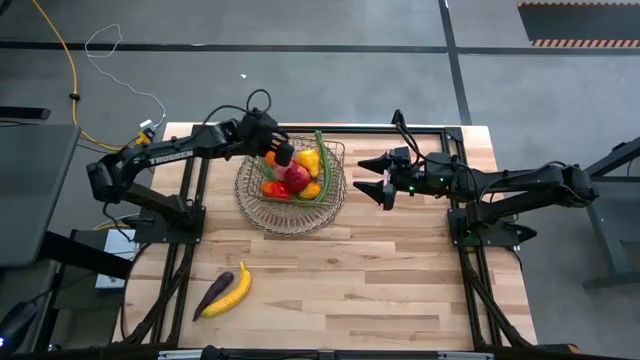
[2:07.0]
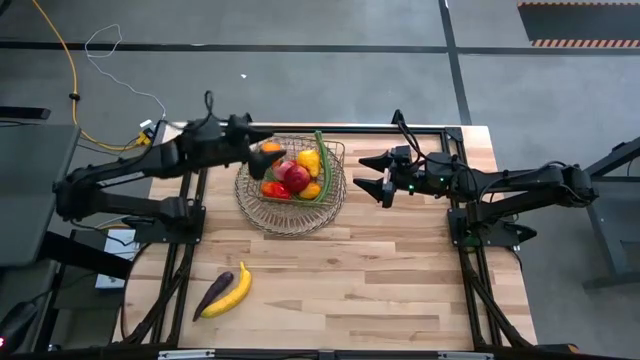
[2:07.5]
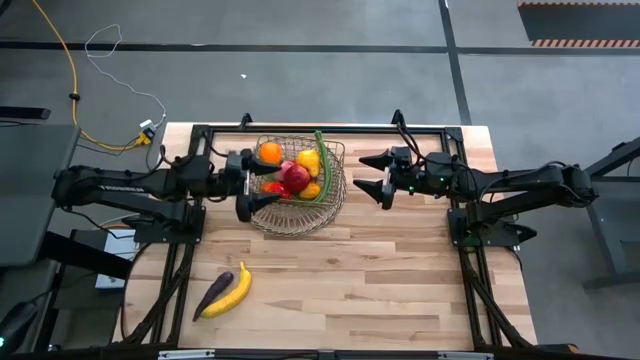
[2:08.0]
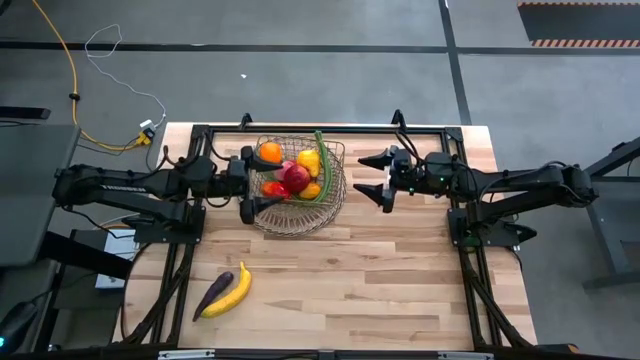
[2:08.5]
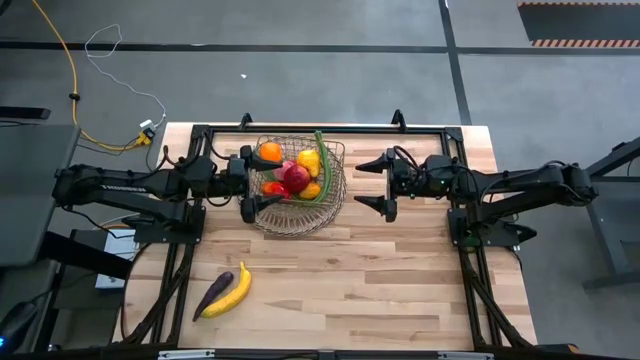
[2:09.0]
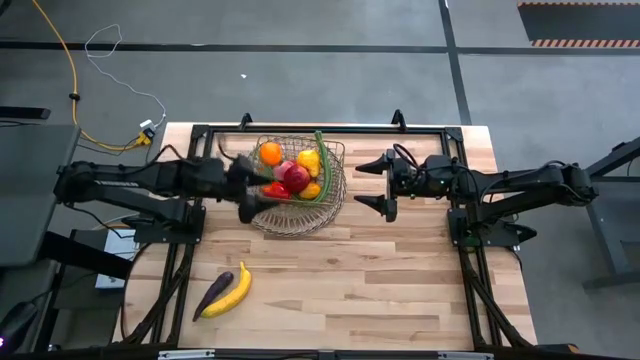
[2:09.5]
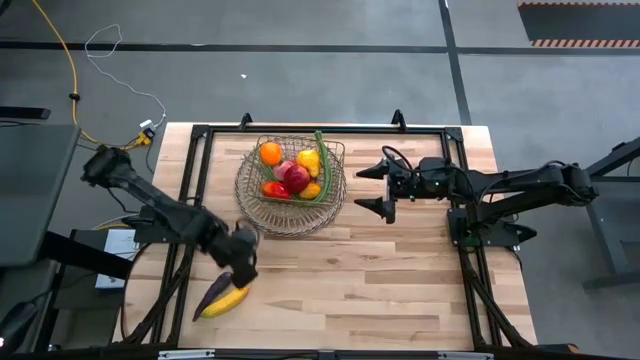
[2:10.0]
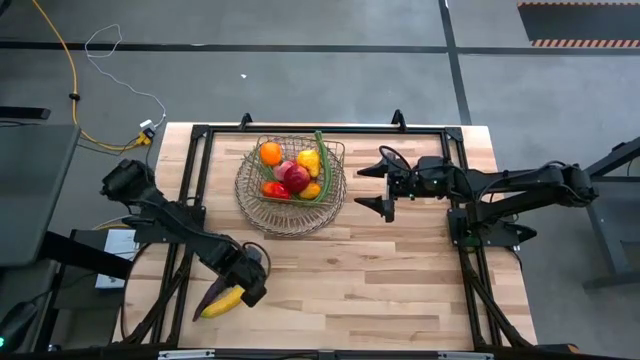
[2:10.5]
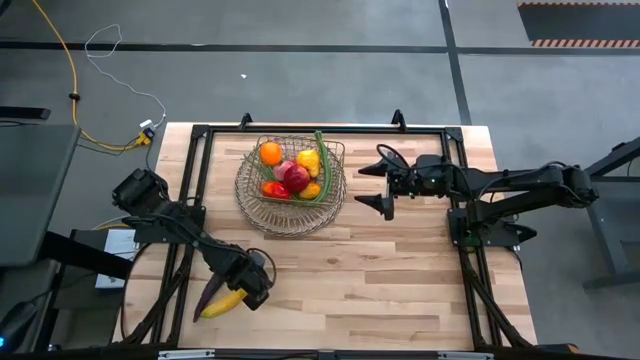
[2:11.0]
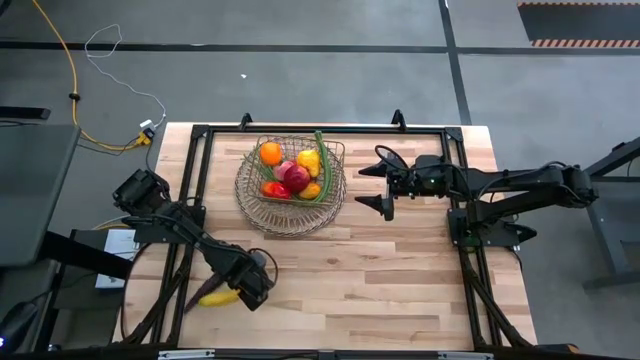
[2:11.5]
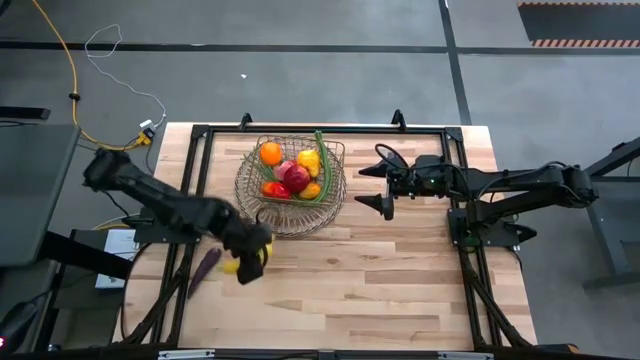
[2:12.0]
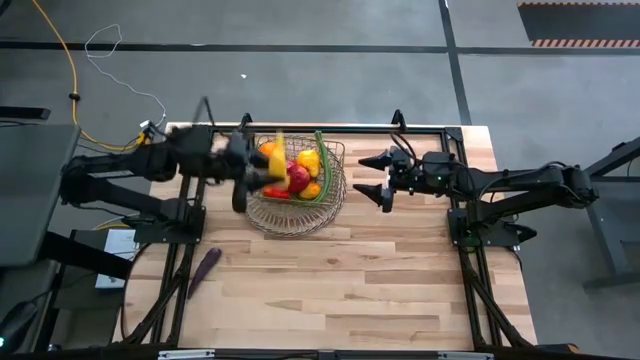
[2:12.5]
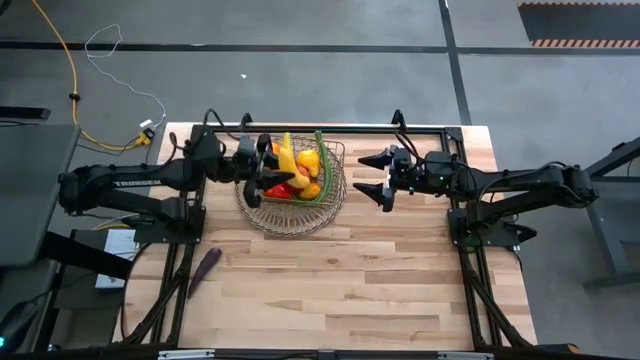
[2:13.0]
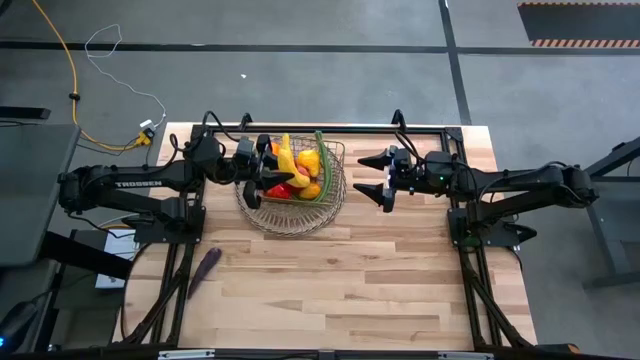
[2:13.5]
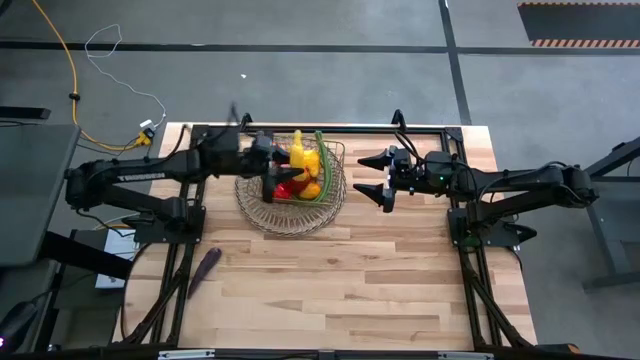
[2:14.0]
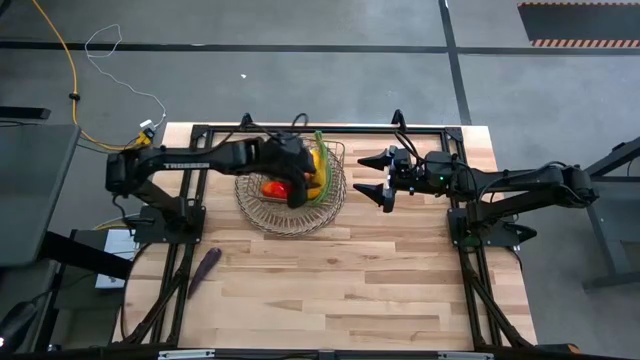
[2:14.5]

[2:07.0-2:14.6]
Task: Build produce basket
Put the yellow banana into the wire basket

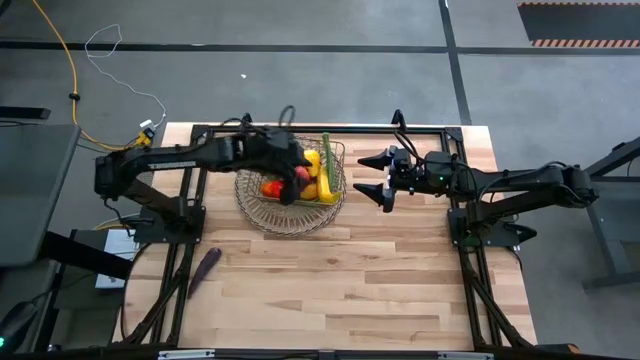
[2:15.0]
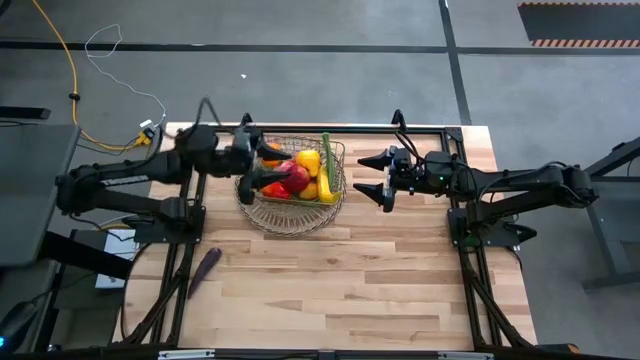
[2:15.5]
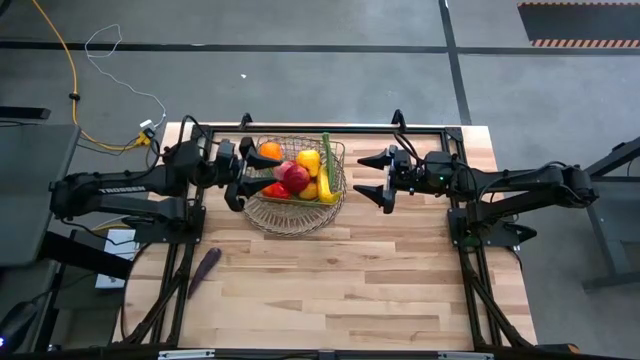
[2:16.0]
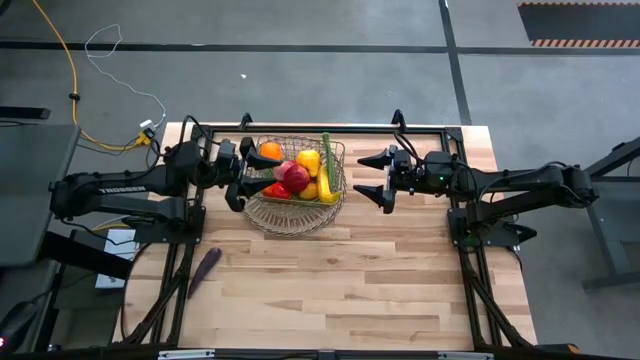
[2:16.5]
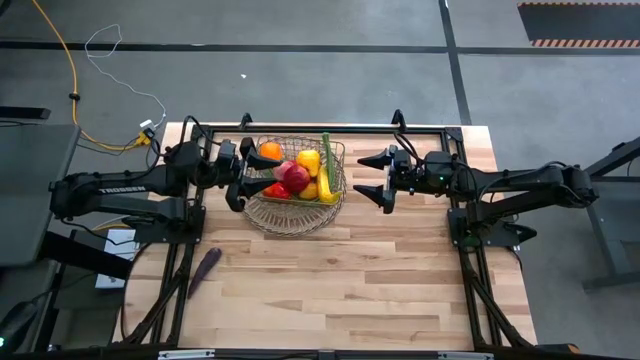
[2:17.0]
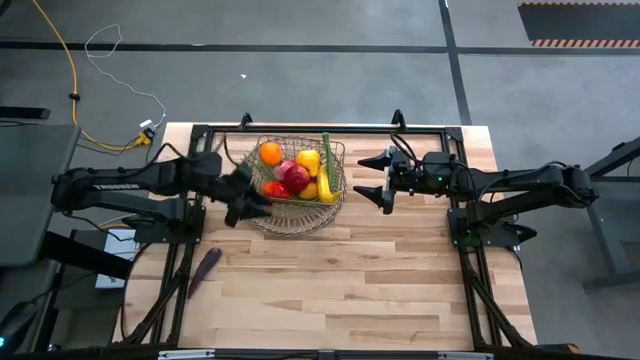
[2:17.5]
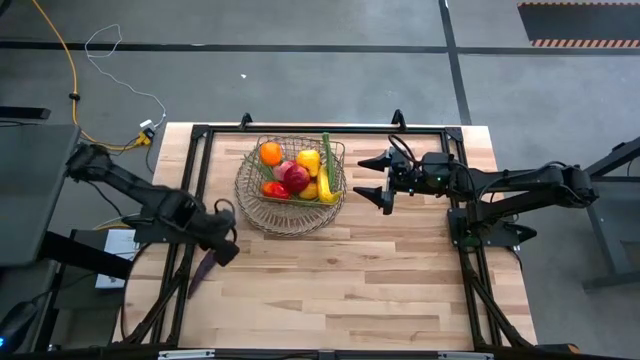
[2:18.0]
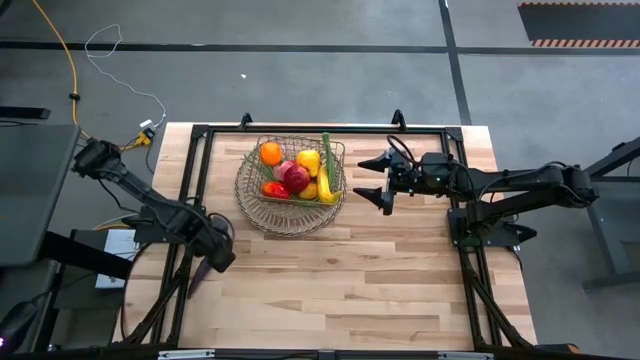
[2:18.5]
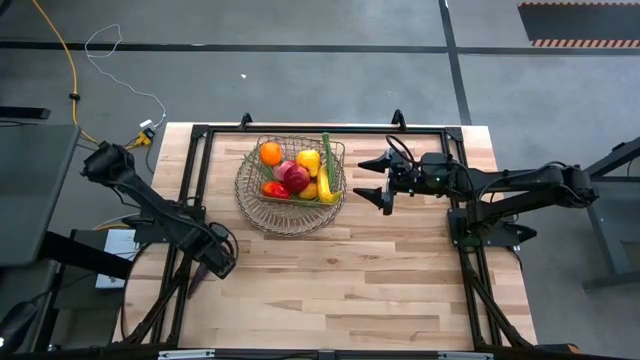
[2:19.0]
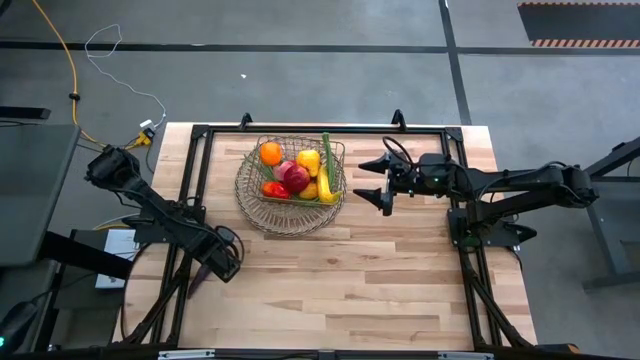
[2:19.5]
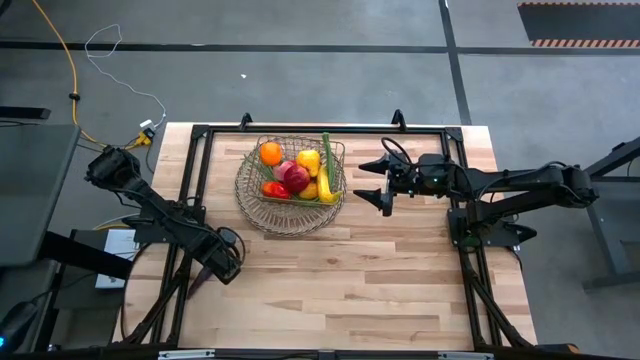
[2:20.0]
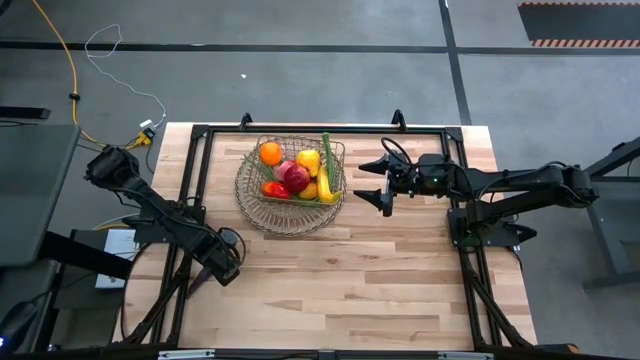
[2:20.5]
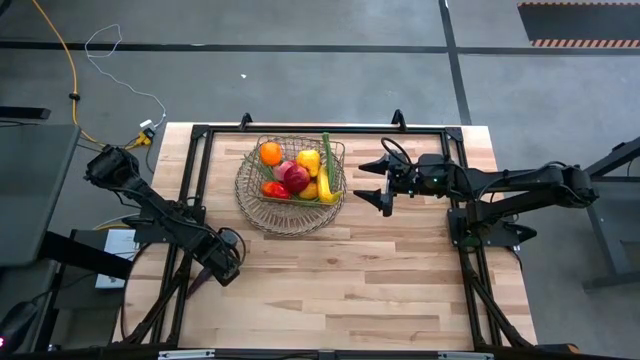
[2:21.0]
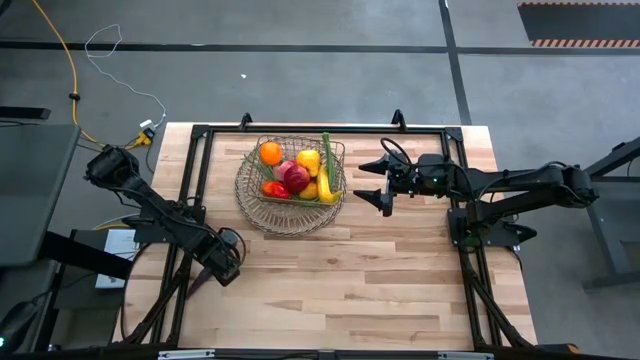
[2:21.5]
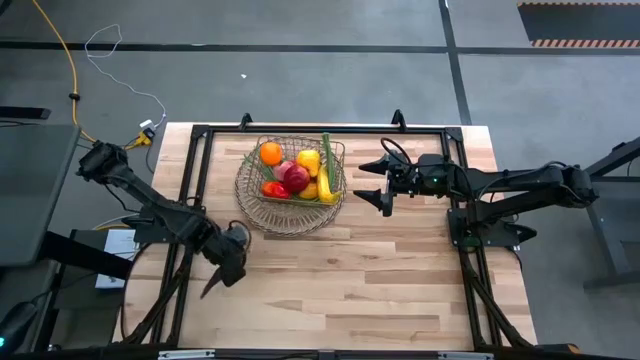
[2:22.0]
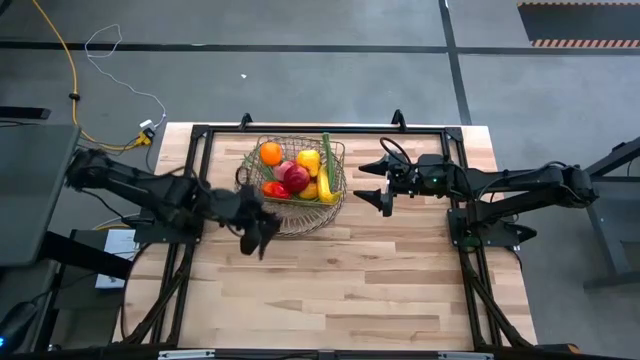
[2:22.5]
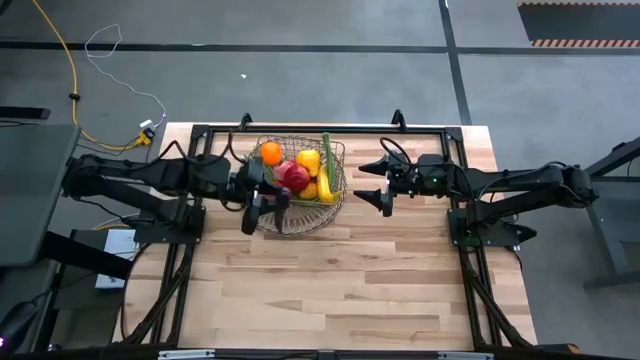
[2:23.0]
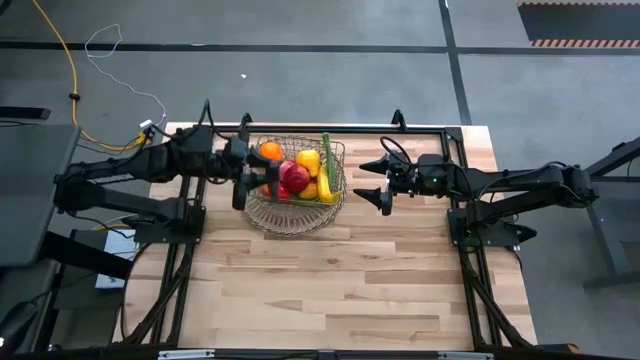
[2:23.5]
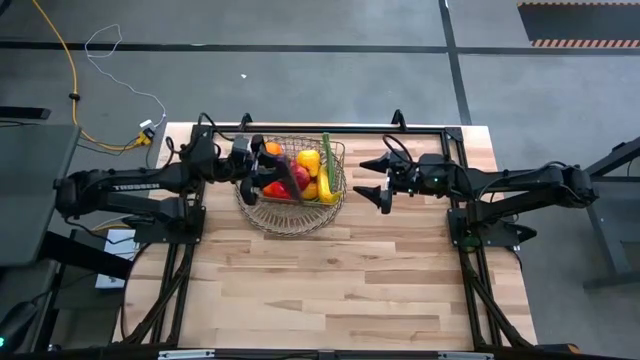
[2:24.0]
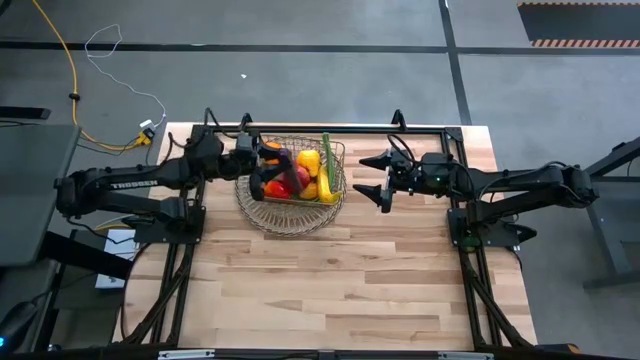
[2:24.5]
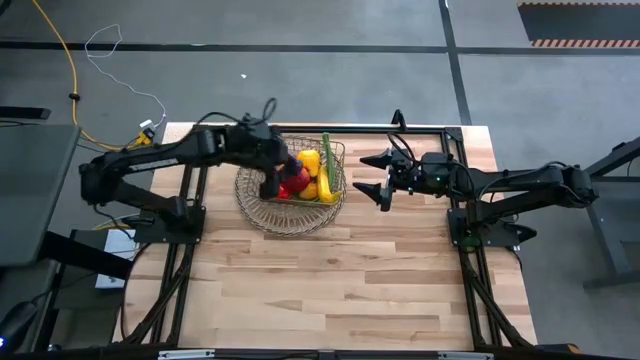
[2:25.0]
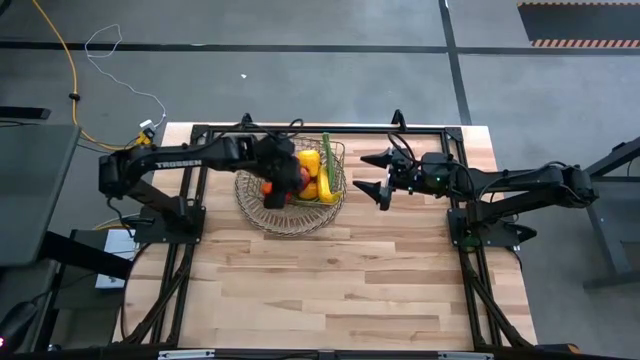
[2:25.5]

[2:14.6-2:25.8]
Put the violet eggplant into the wire basket

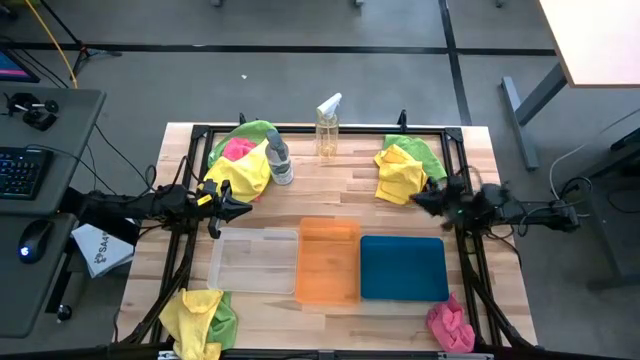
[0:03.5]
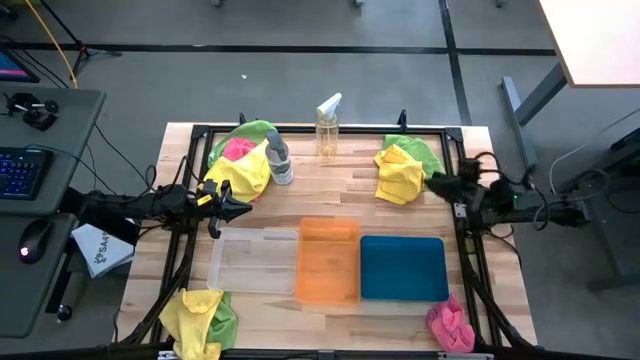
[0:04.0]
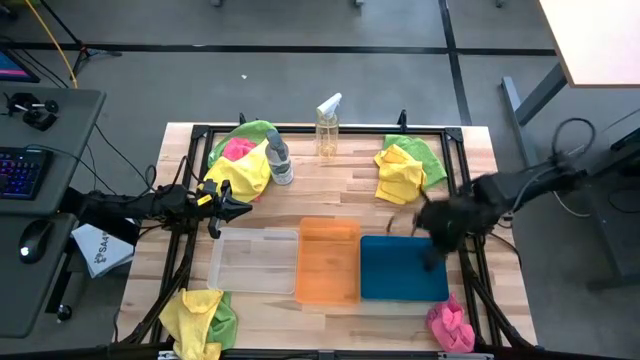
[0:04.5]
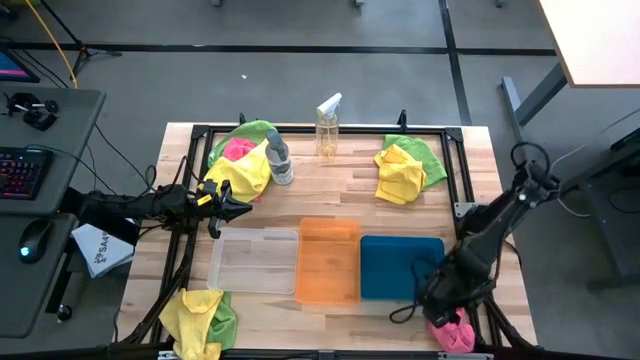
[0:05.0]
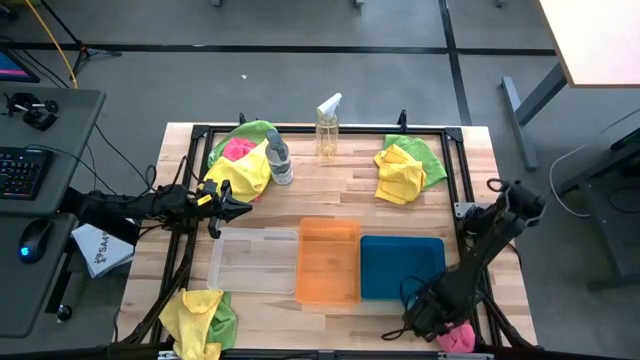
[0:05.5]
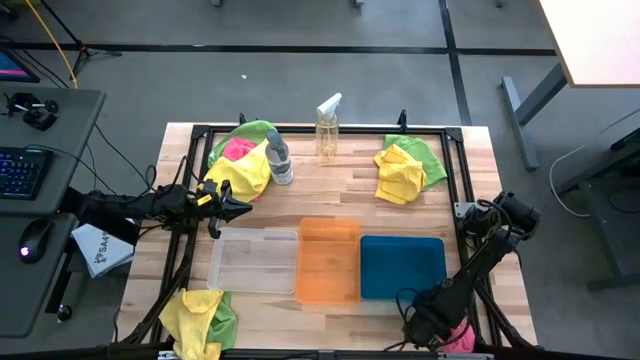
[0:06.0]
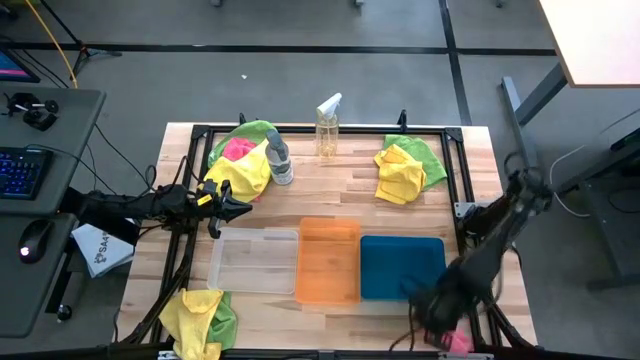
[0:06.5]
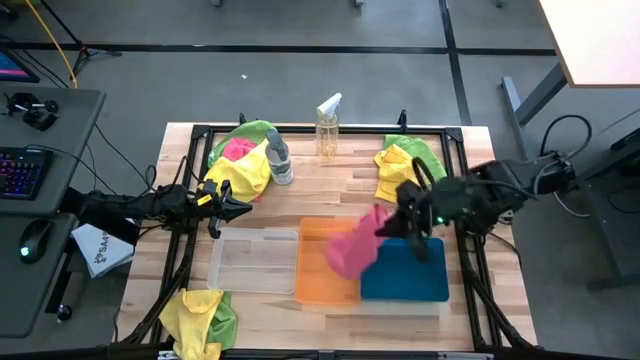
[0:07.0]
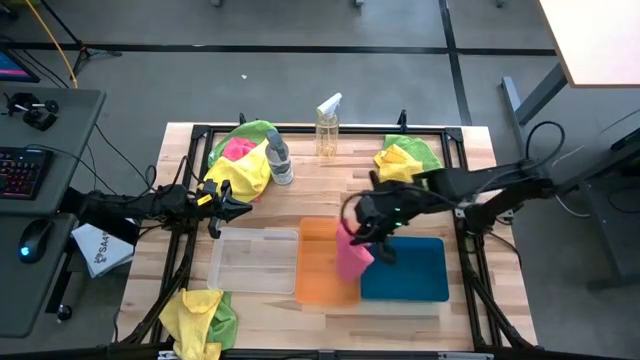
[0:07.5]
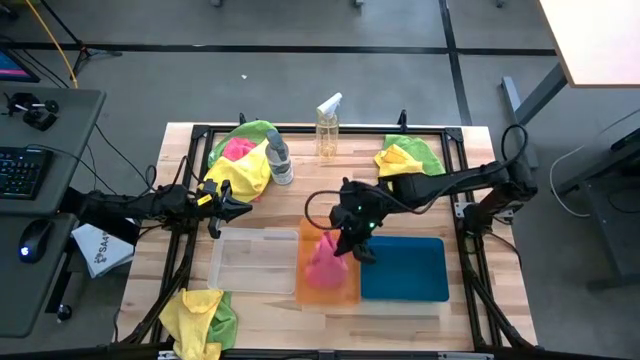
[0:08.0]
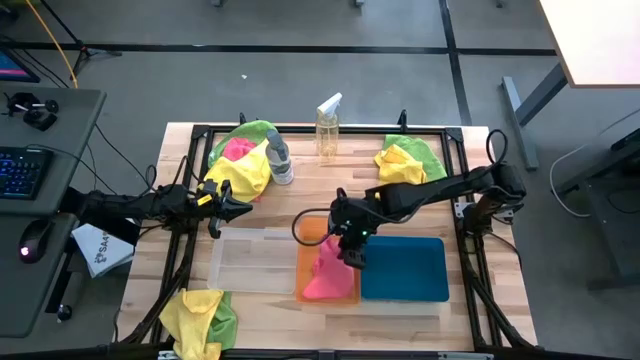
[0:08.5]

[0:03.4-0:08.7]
Task: Sort microfiber towel by color & place in baskets
Put the bottom pink towel into the orange bin
